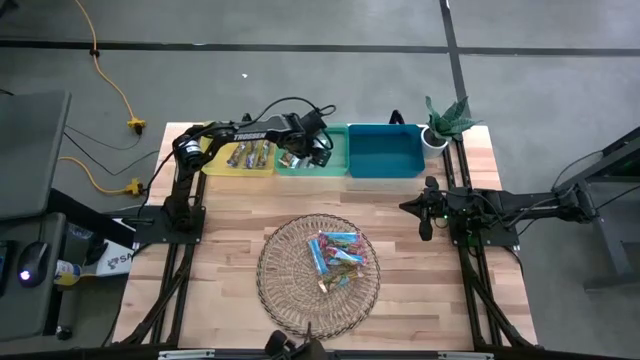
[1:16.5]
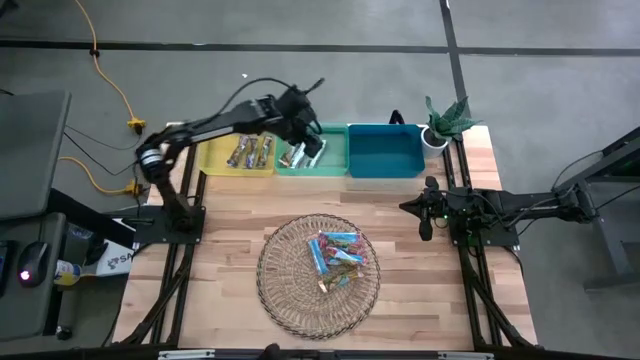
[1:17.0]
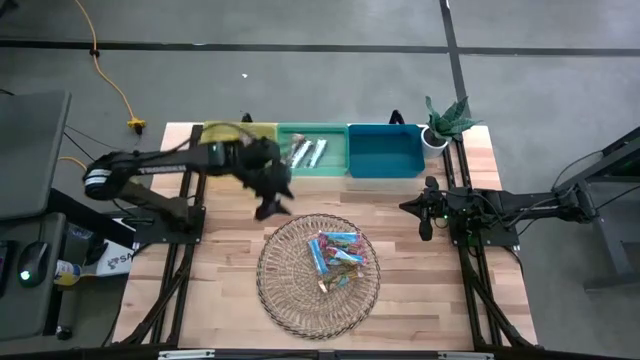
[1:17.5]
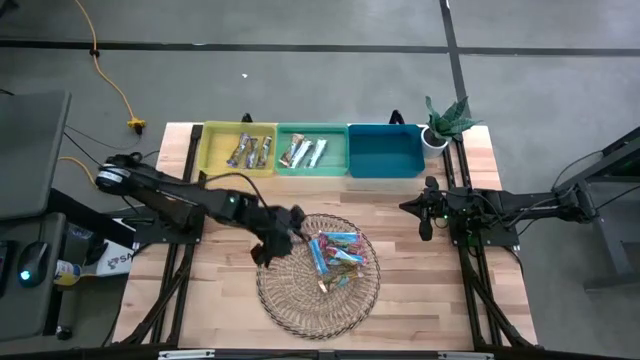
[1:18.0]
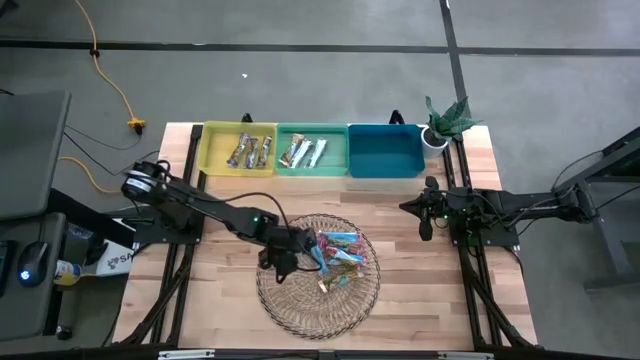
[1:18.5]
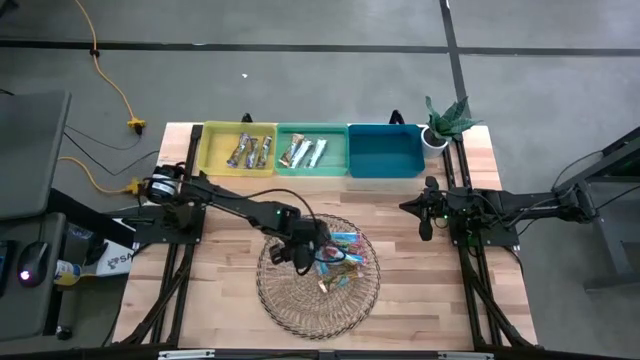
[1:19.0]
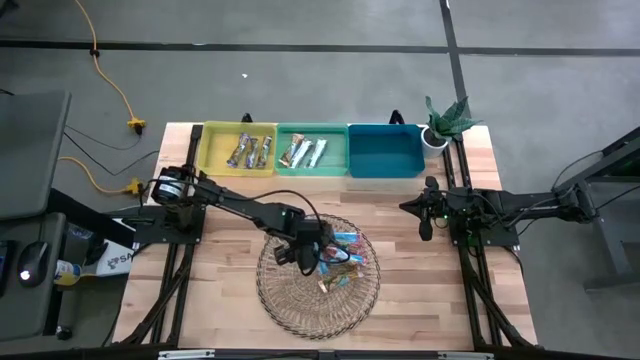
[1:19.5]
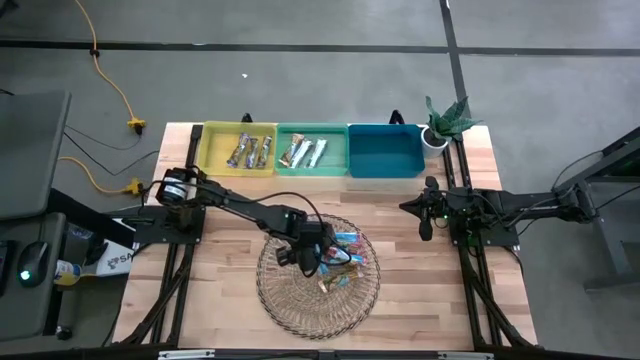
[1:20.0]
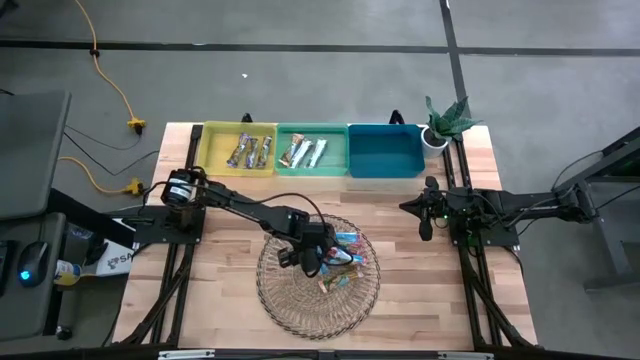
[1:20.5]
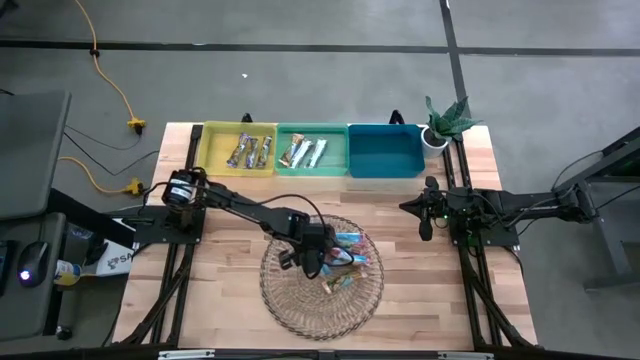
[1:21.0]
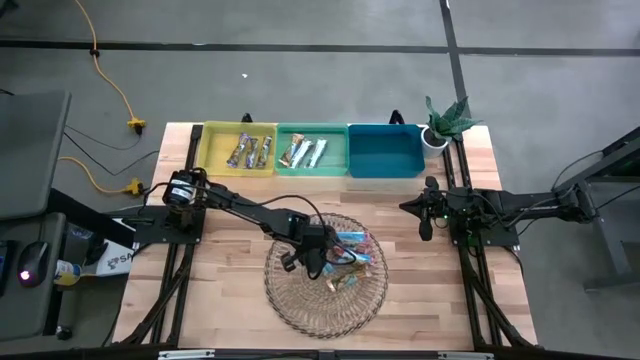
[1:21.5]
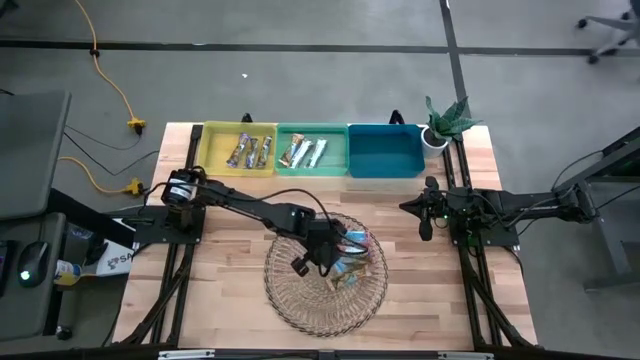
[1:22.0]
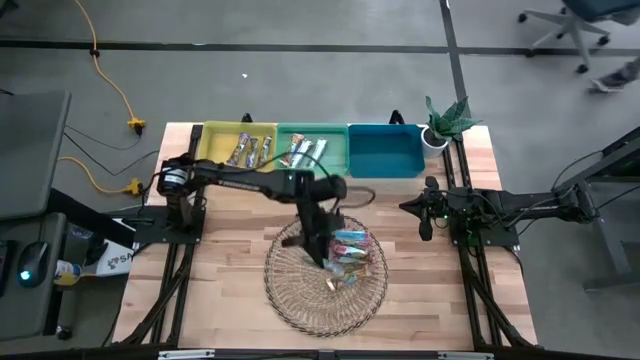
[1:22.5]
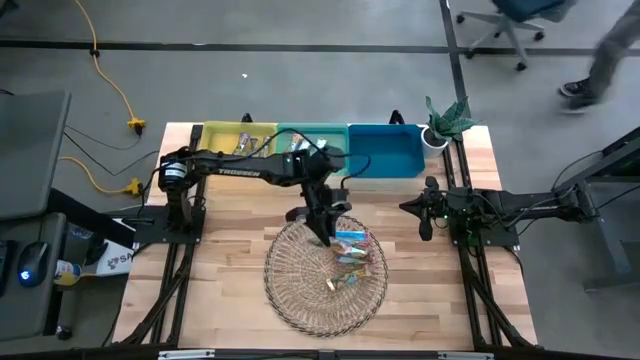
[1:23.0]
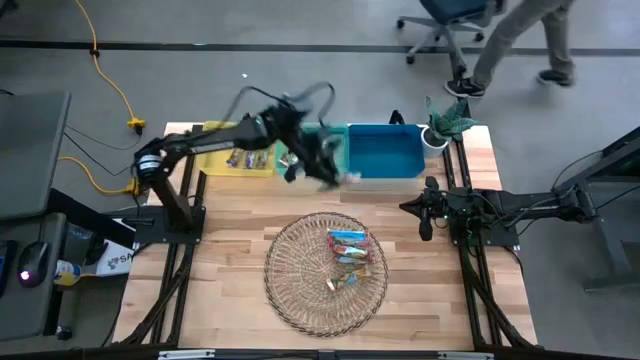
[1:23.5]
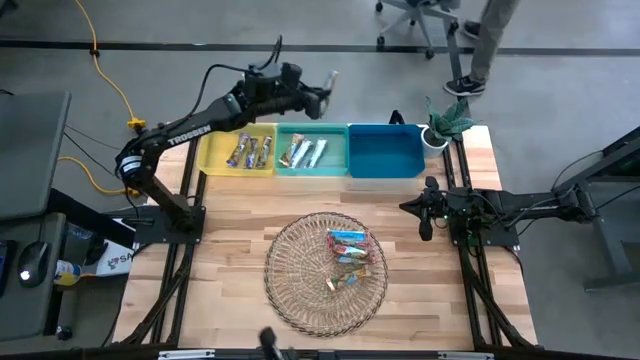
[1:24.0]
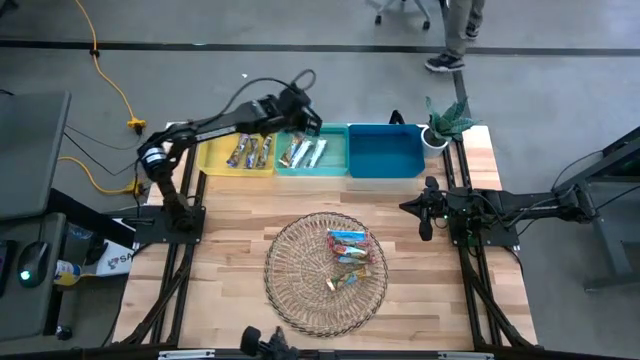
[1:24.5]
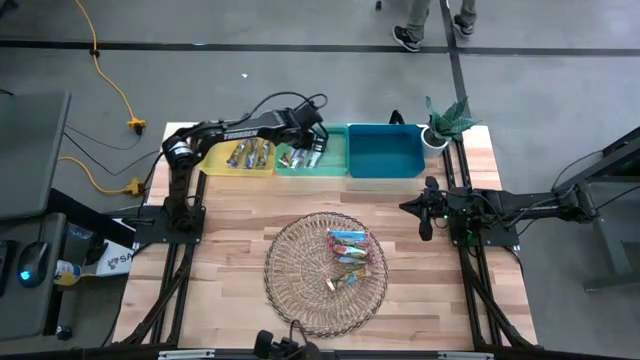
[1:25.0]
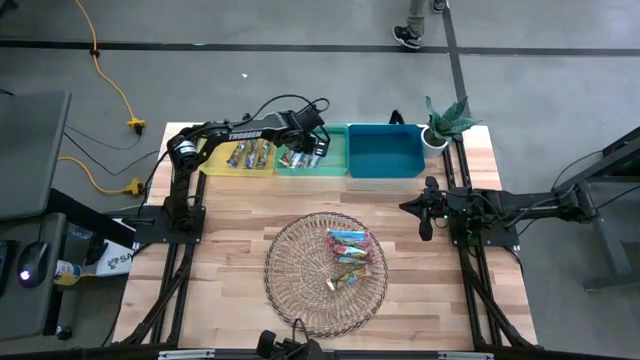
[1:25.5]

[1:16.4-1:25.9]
Task: Pick and place Granola Bars by type
Put the yellow granola bar into the green bin

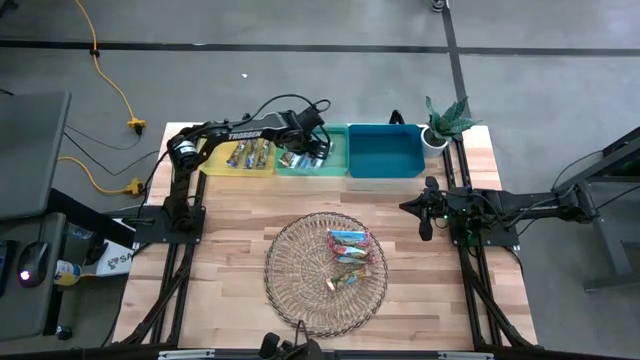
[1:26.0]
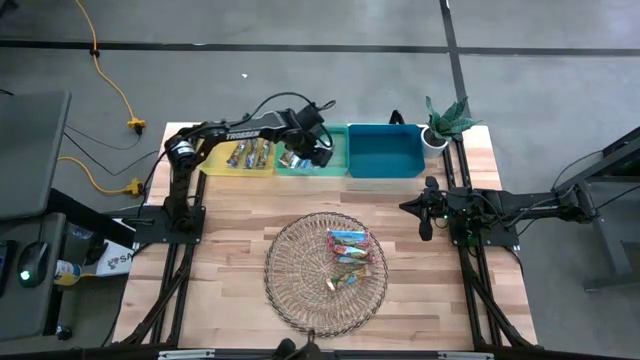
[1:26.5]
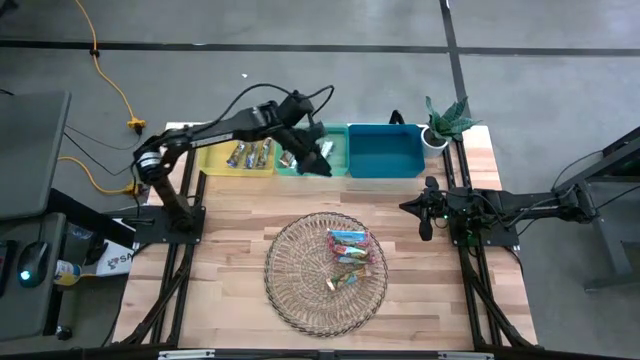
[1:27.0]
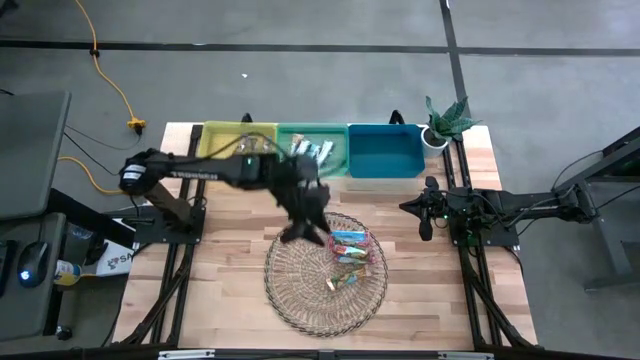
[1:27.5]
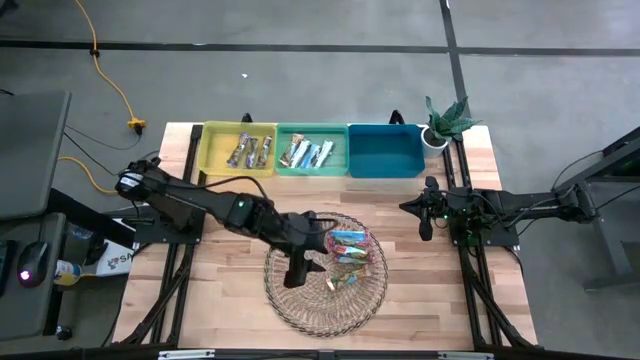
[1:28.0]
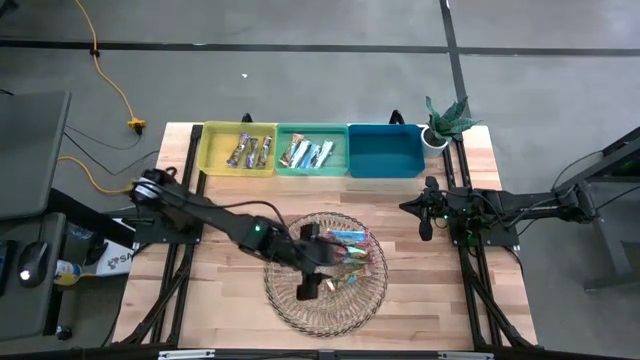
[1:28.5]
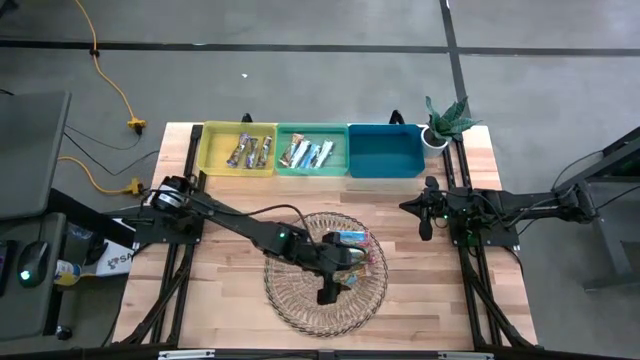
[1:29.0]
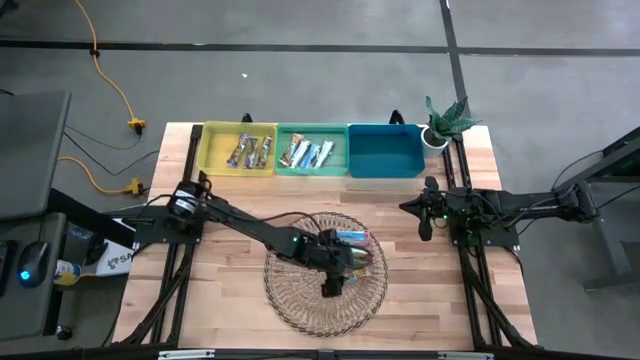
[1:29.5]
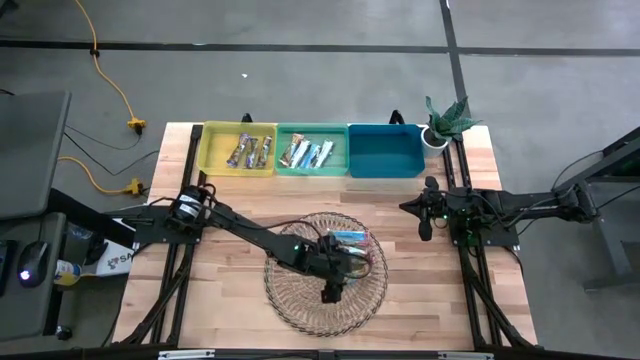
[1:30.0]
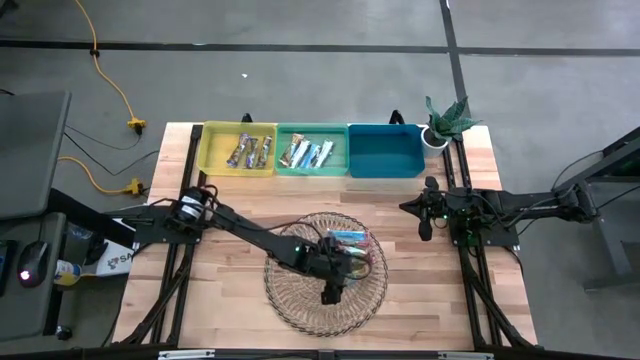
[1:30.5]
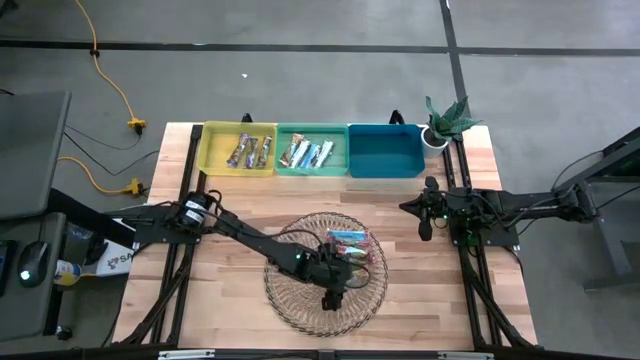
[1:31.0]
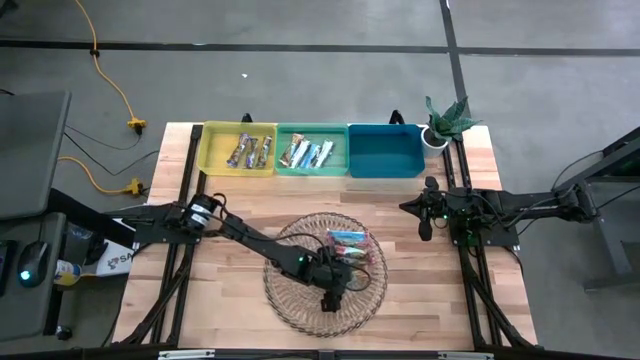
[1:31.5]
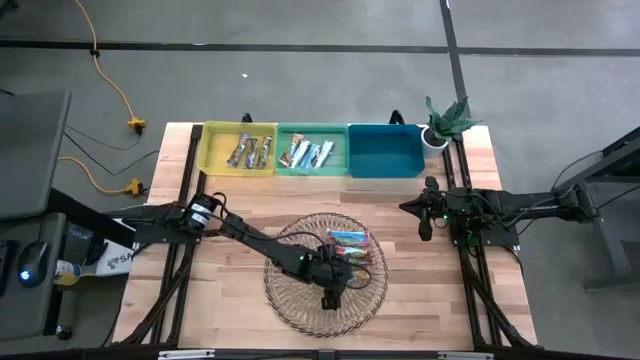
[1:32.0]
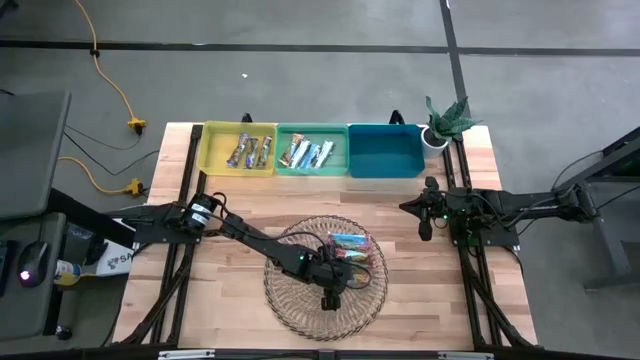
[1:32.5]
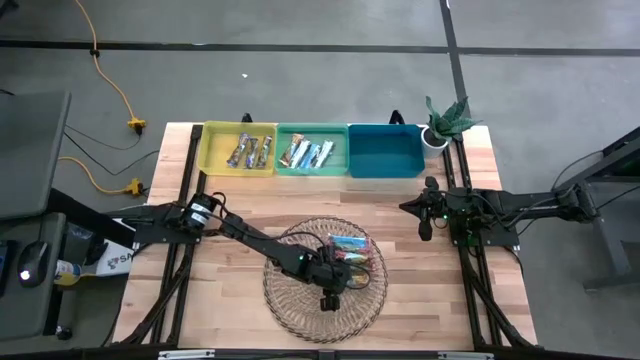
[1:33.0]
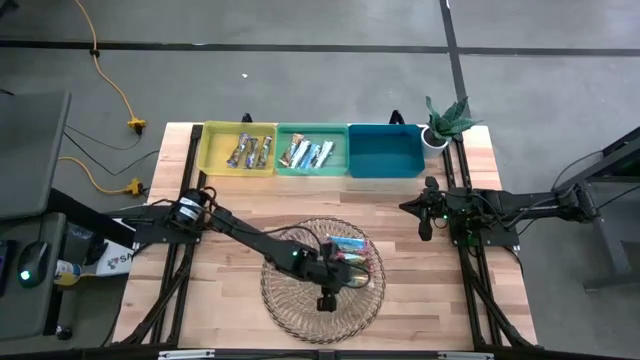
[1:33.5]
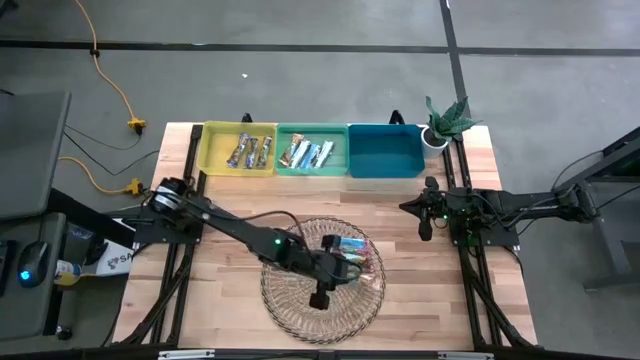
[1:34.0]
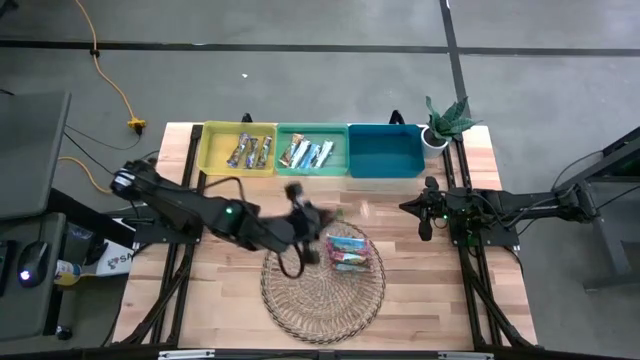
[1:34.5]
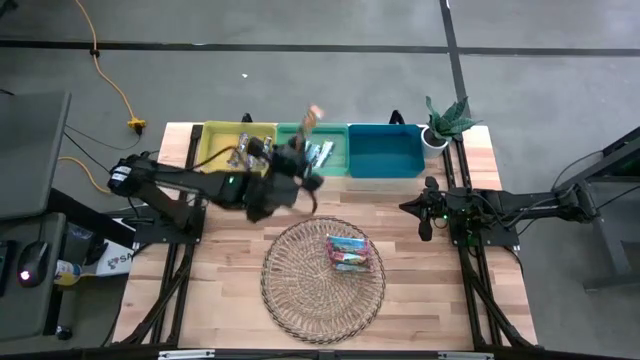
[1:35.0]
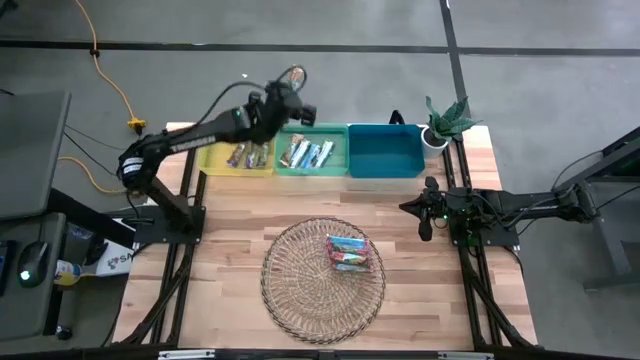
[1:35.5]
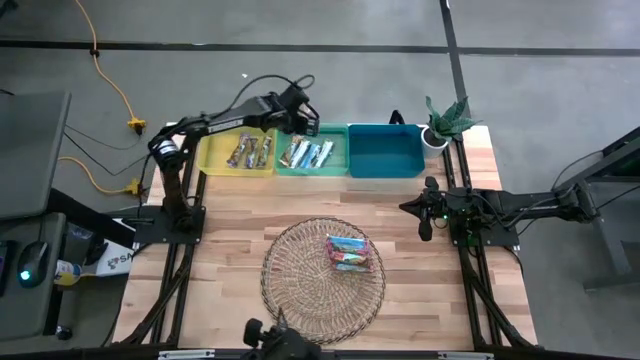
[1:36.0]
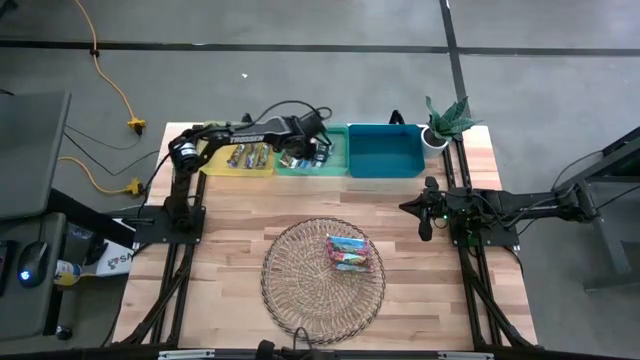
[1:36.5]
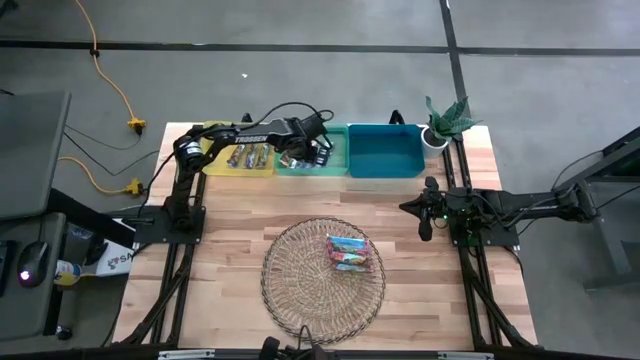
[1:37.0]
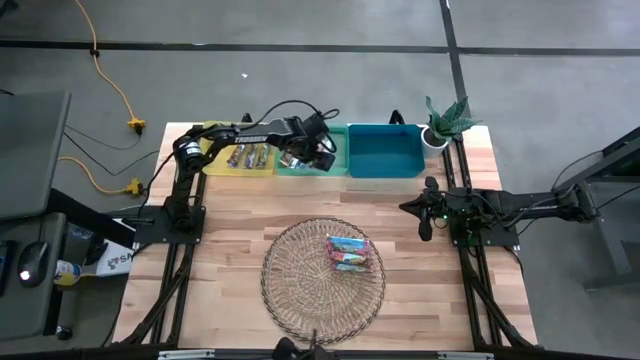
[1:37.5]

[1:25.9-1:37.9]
Put the yellow granola bar into the green bin
